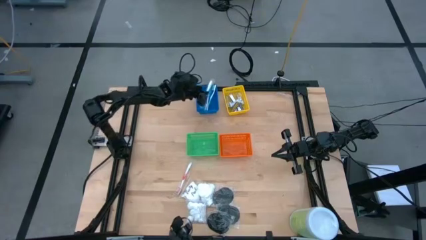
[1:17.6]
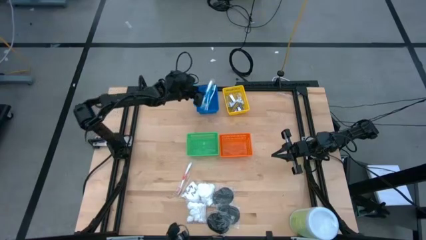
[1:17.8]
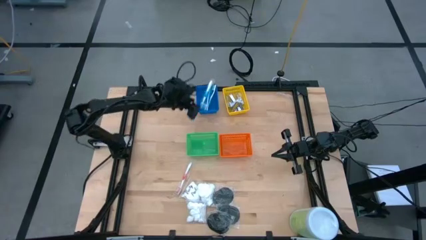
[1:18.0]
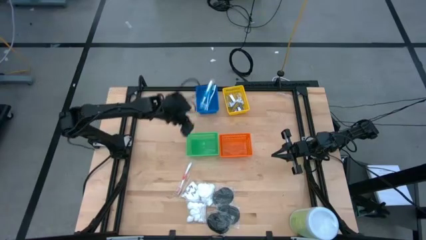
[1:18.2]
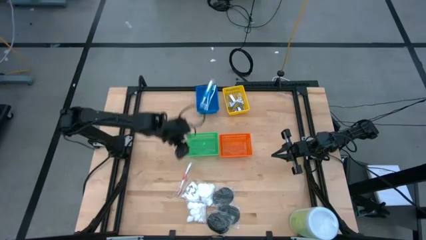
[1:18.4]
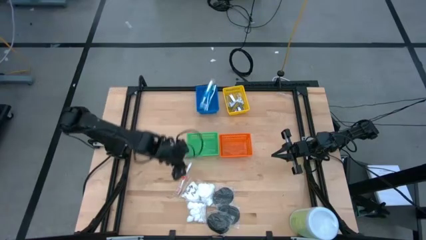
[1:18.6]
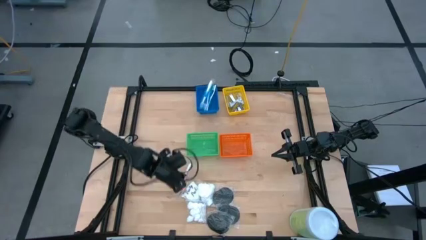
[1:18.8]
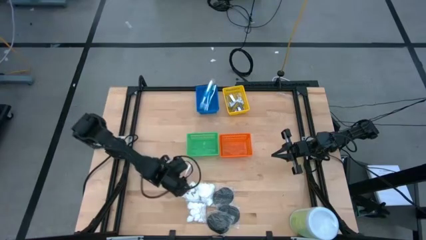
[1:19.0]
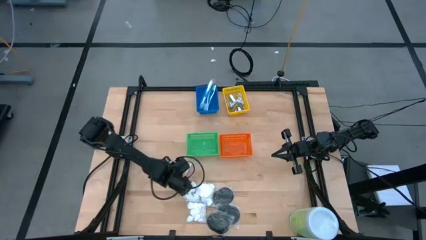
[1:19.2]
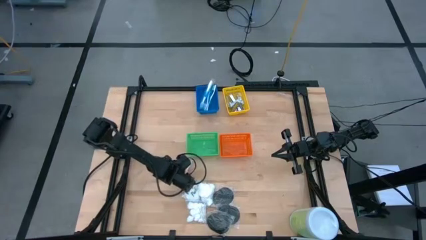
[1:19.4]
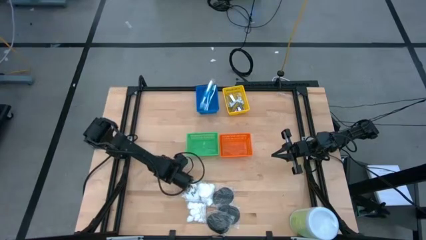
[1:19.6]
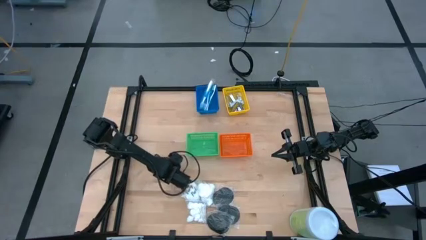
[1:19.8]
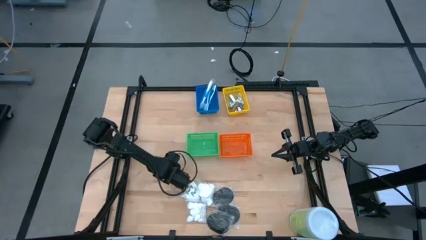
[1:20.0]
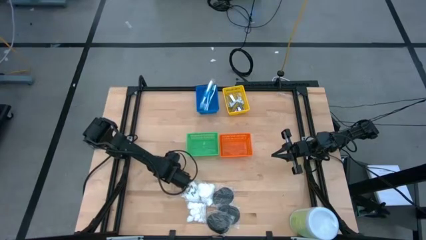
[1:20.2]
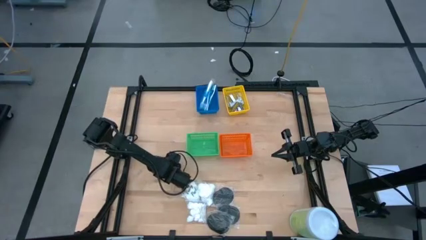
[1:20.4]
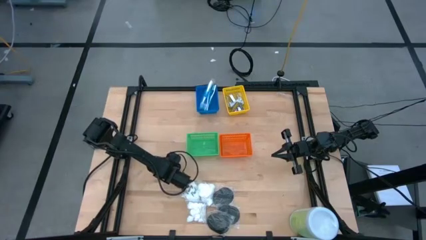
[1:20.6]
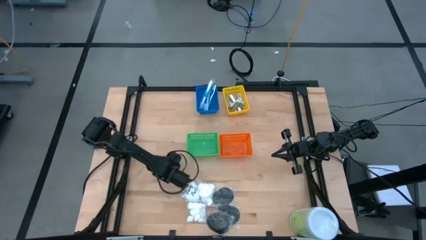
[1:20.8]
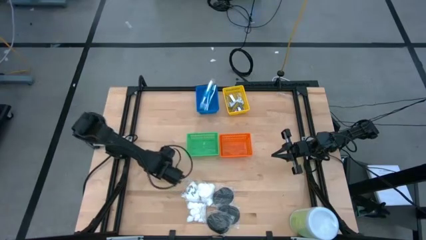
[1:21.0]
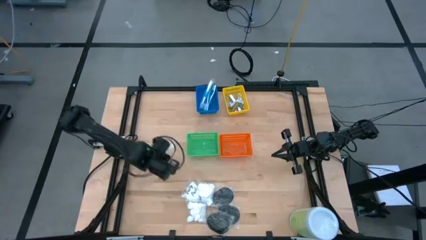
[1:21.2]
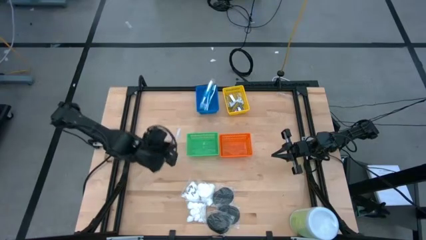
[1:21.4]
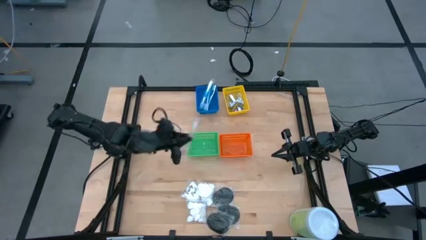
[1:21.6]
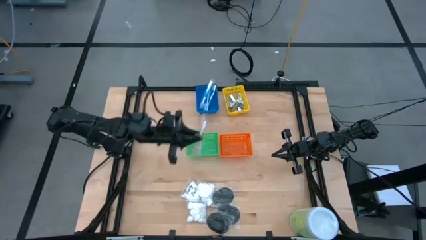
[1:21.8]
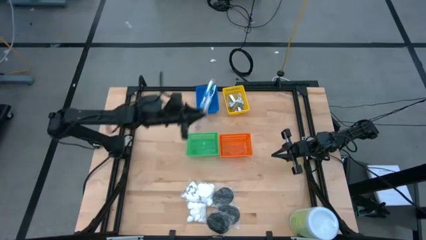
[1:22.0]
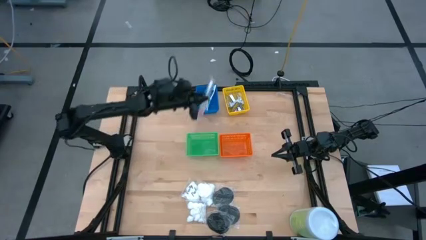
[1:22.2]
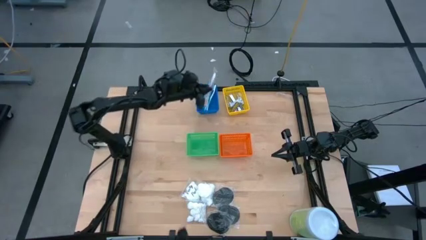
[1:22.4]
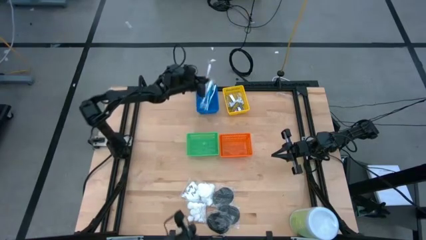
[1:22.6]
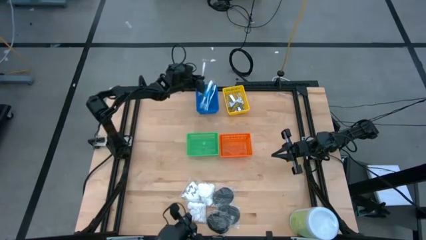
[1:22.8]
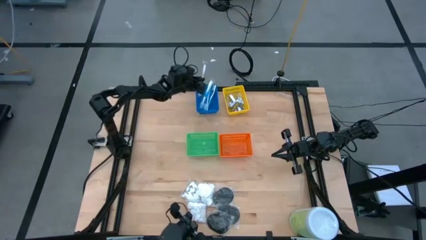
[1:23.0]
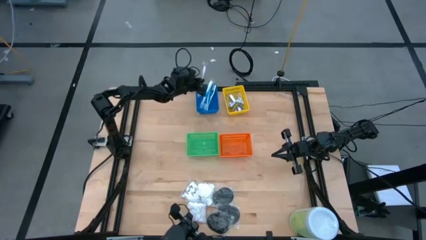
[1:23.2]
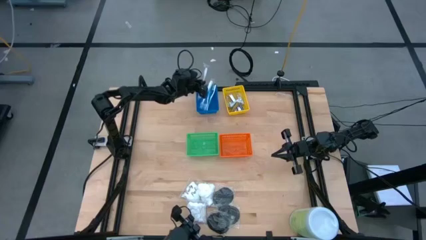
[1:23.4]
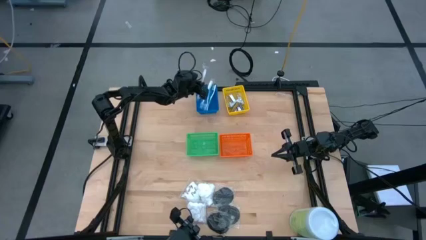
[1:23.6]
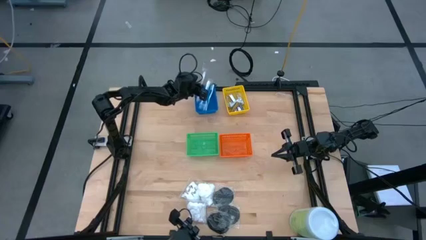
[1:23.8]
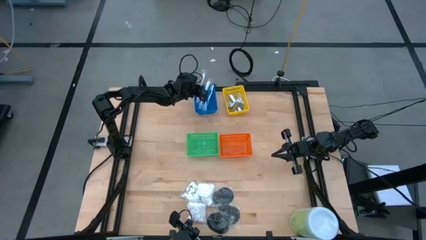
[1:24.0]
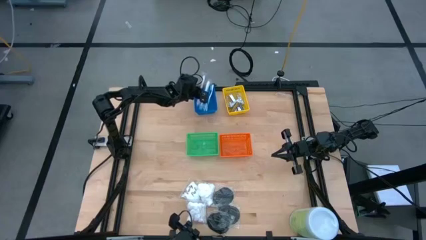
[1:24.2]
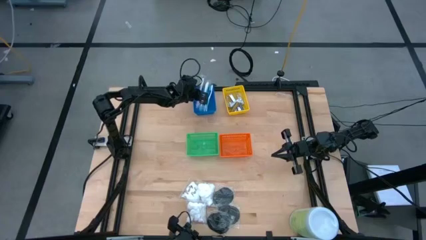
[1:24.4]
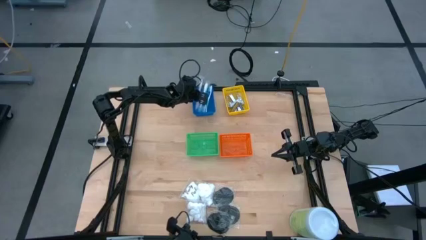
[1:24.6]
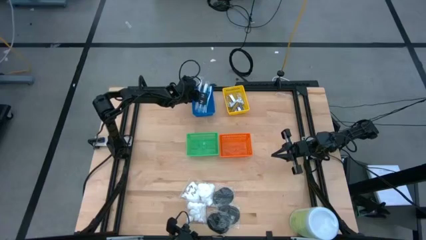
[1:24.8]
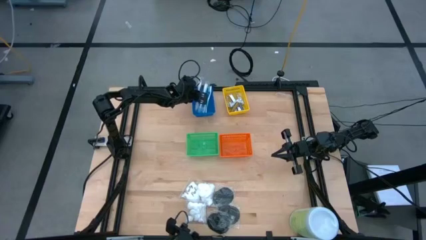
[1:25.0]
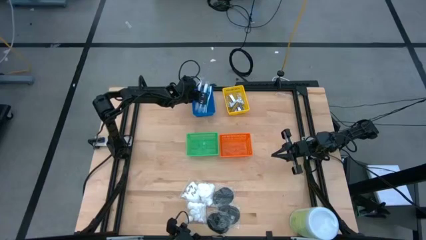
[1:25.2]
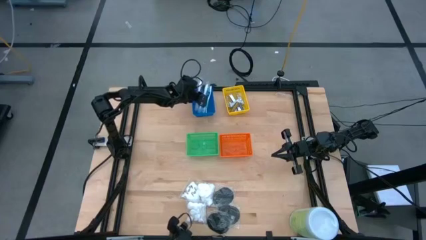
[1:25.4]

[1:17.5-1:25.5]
Task: Pick & Place Travel size toiletries
Put the red toothbrush into the blue bin

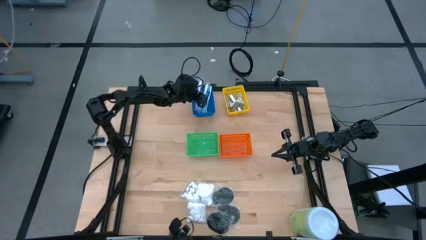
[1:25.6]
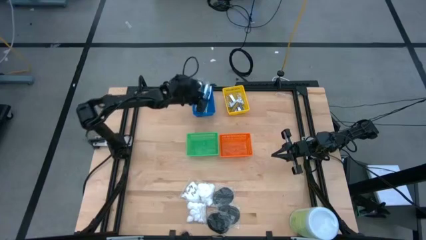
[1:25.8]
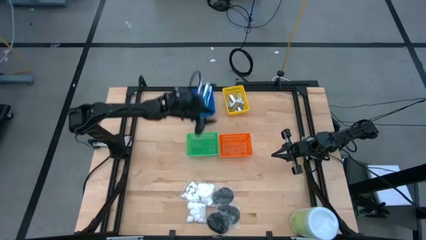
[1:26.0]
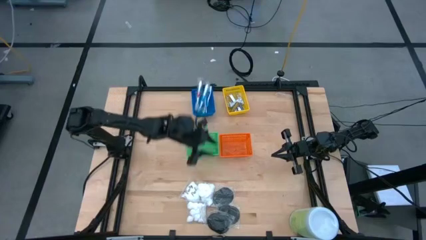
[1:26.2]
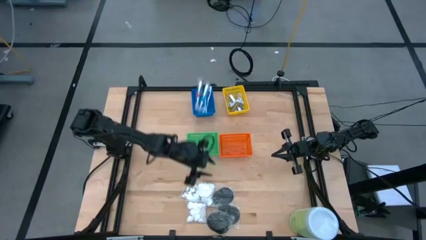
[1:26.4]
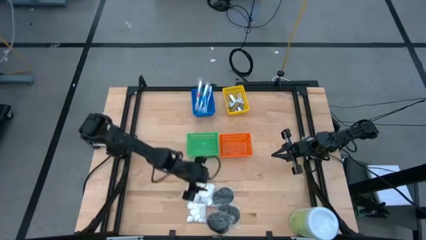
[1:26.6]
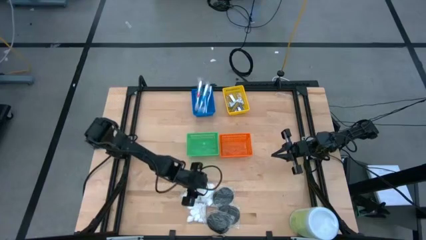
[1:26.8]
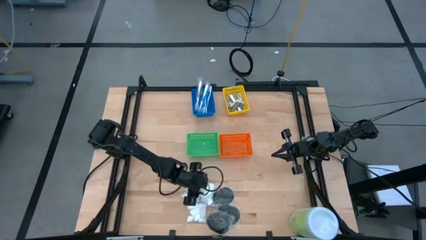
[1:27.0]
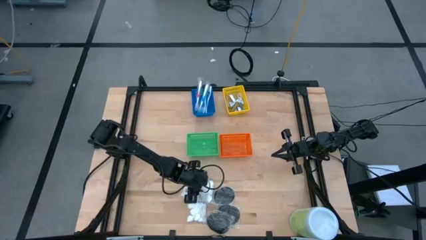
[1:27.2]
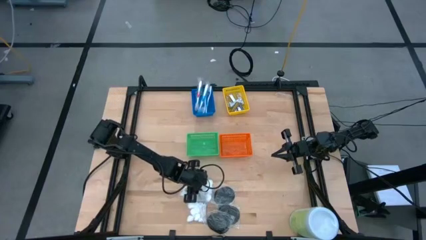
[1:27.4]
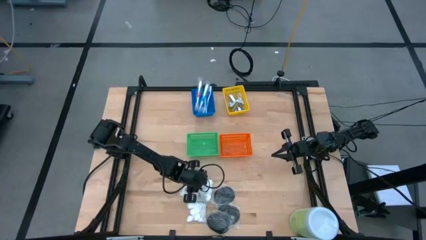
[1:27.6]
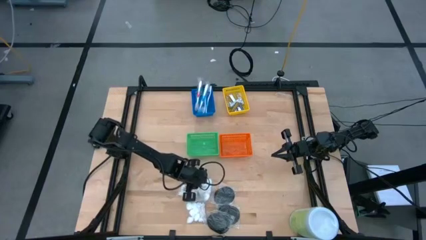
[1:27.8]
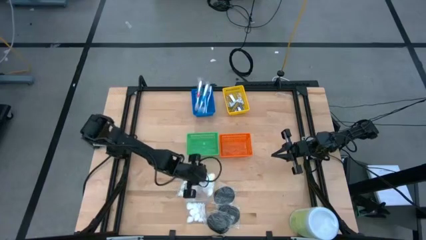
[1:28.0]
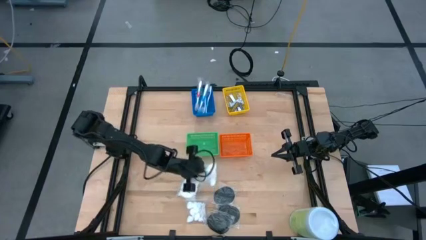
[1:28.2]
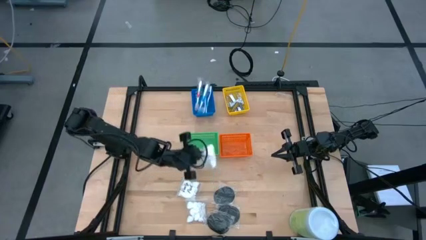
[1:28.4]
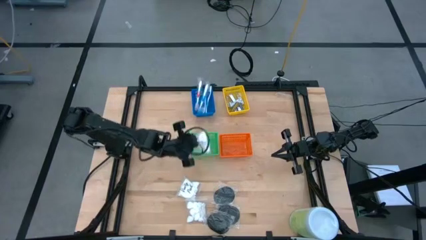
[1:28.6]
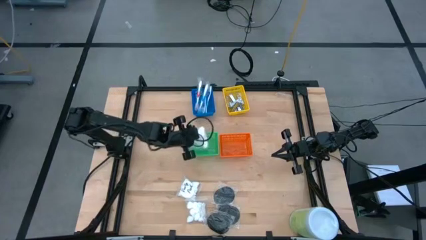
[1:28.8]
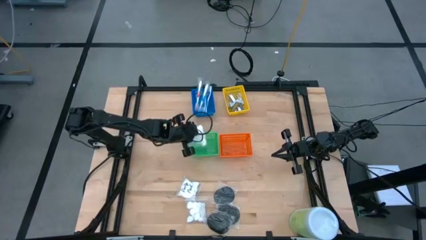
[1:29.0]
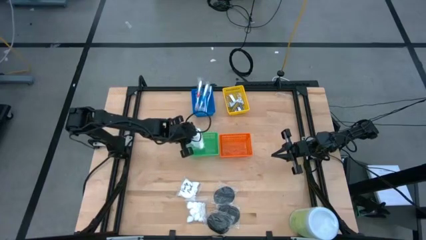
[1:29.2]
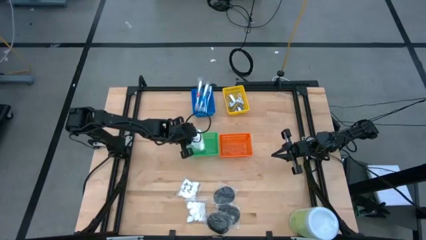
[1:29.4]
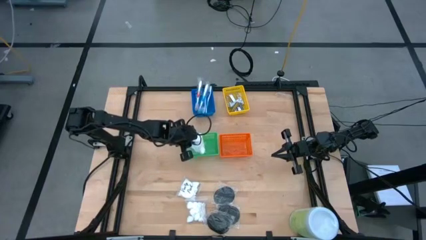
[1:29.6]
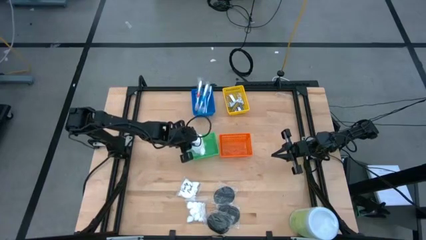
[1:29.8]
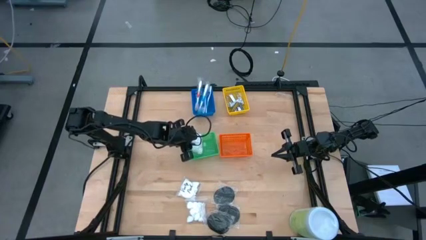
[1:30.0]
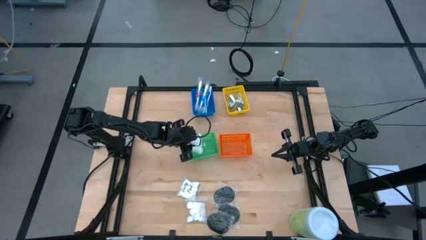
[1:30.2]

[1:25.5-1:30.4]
Put the right cotton pack into the green bin

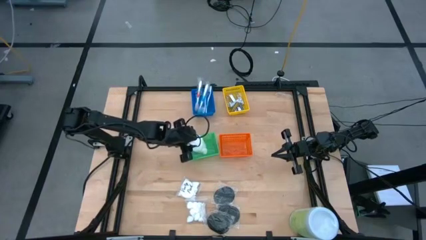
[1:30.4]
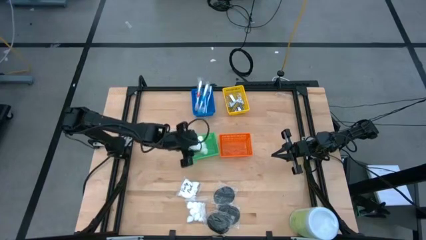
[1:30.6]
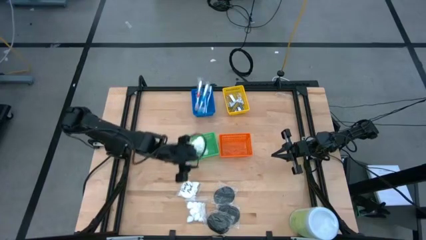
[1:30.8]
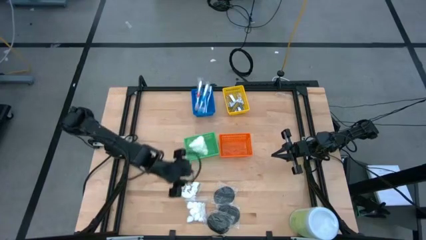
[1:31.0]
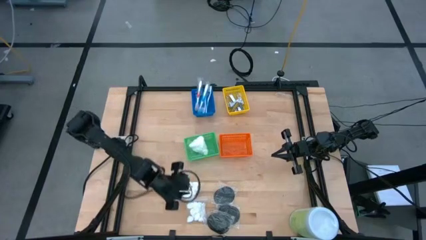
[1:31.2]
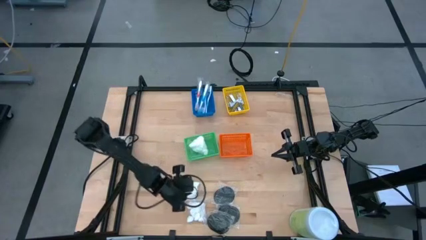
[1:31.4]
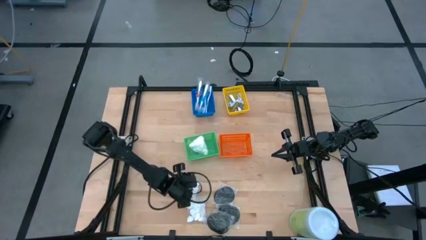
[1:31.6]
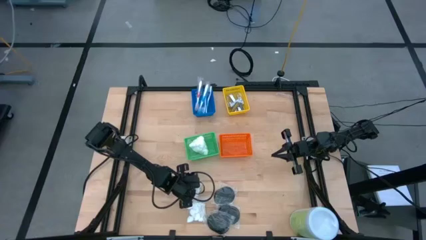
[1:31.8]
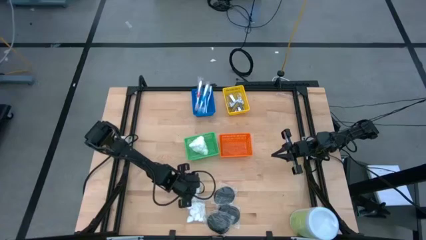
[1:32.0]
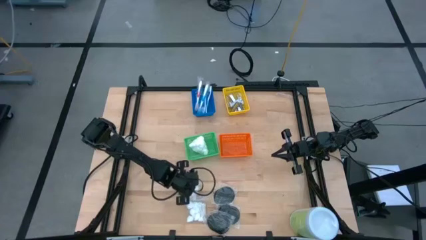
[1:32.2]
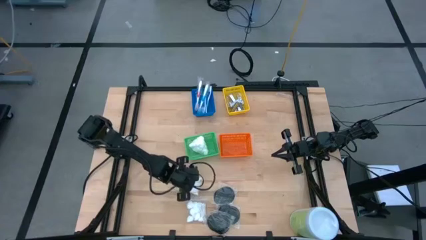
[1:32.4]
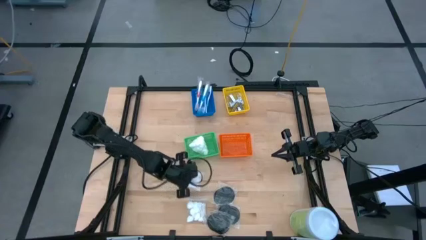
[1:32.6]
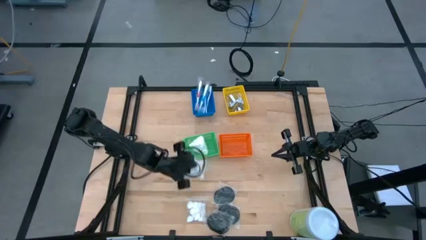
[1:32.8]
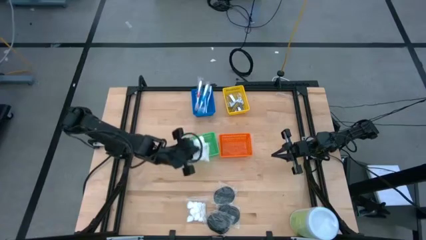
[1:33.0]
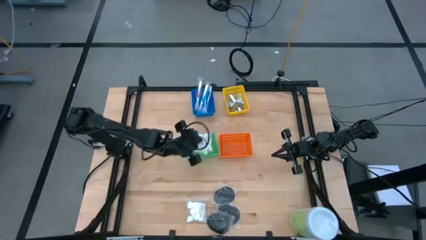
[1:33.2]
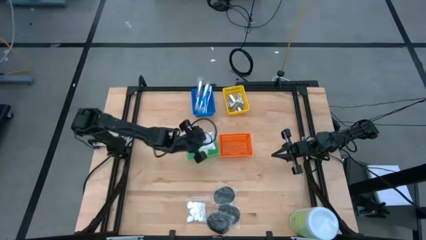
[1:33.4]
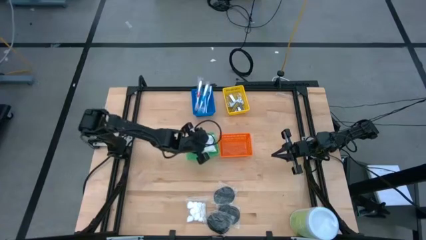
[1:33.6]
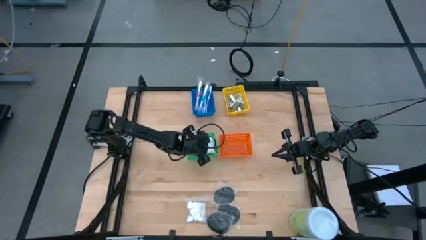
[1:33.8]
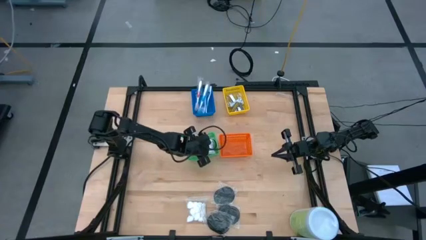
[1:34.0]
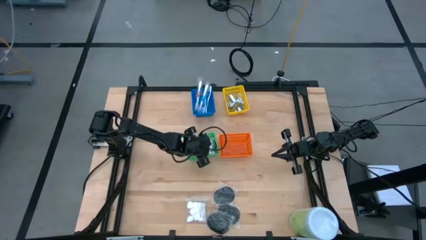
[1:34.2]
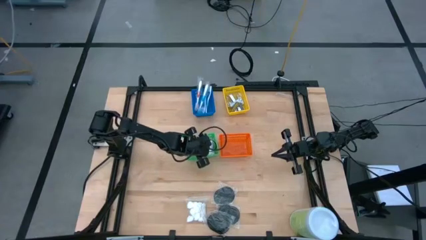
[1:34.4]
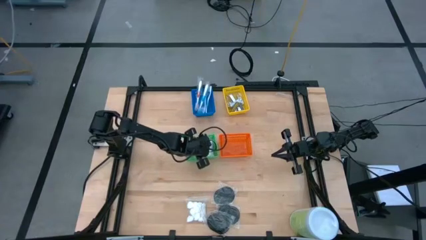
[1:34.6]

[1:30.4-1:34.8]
Put the top cotton pack into the green bin
